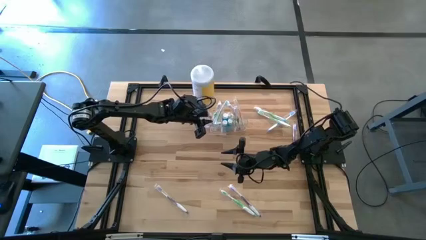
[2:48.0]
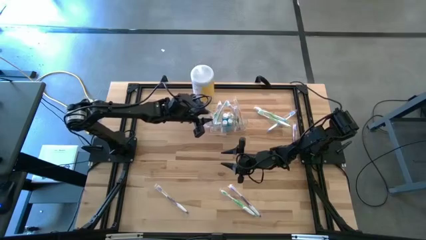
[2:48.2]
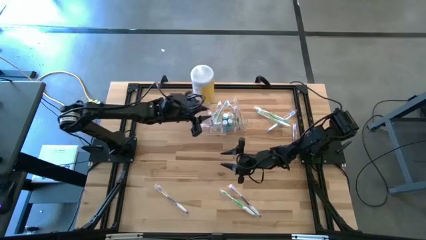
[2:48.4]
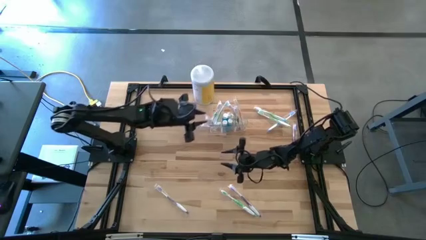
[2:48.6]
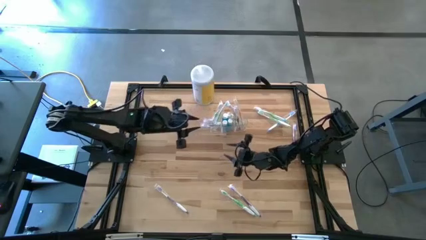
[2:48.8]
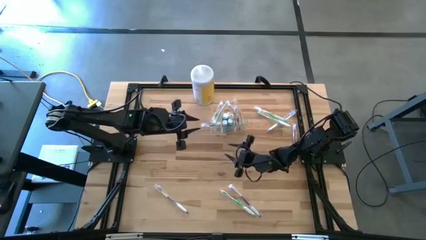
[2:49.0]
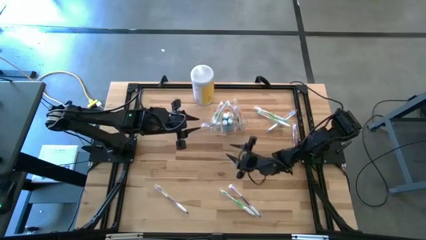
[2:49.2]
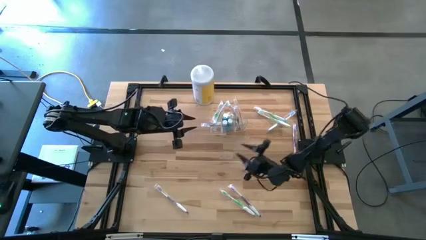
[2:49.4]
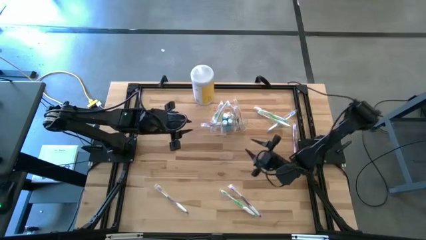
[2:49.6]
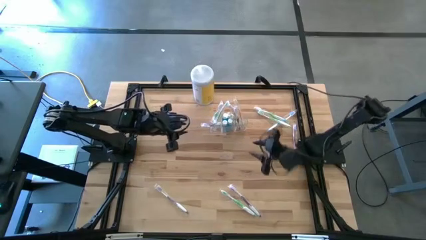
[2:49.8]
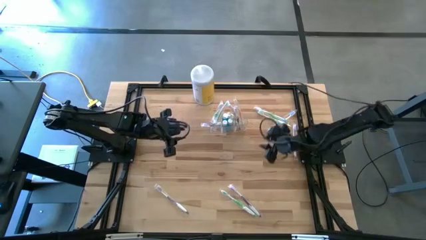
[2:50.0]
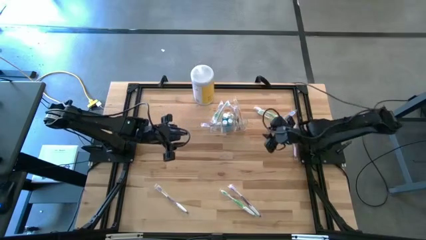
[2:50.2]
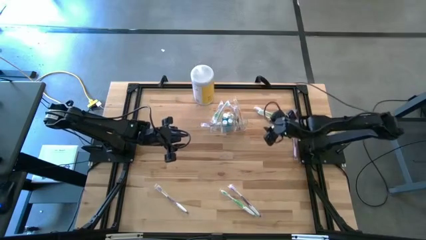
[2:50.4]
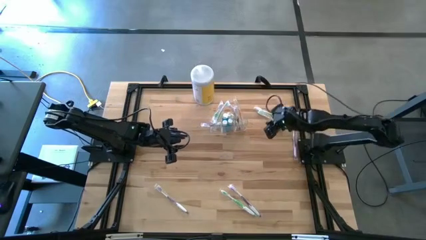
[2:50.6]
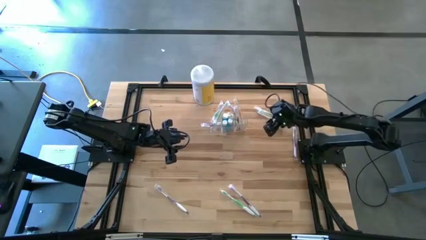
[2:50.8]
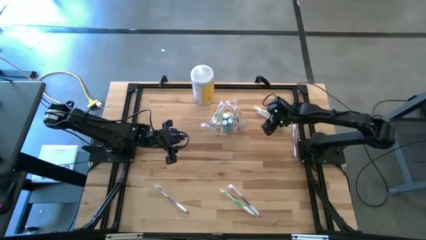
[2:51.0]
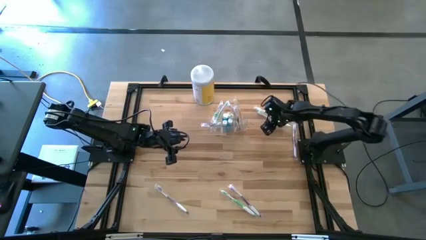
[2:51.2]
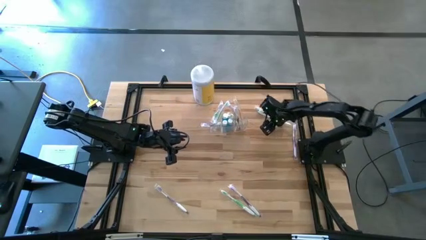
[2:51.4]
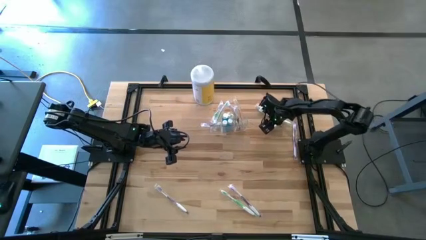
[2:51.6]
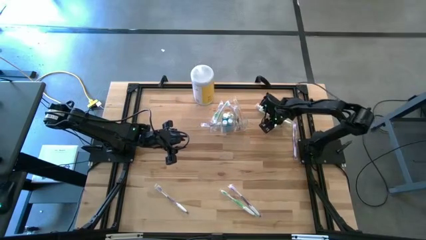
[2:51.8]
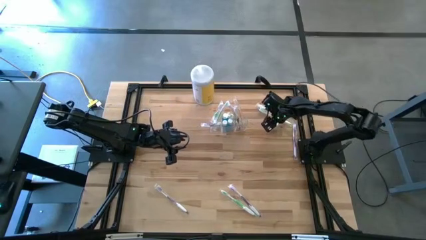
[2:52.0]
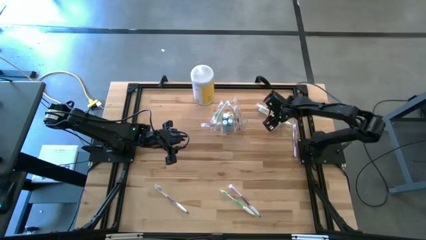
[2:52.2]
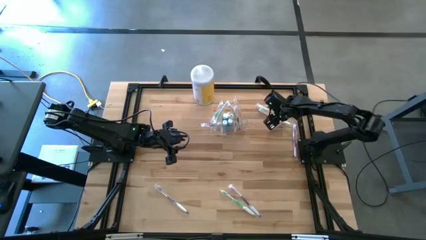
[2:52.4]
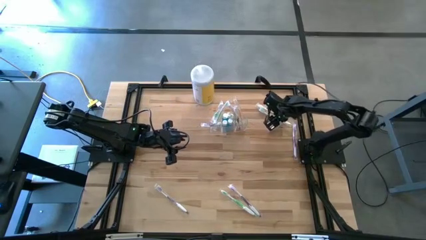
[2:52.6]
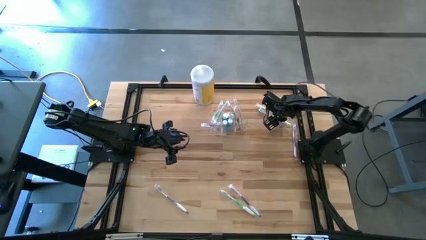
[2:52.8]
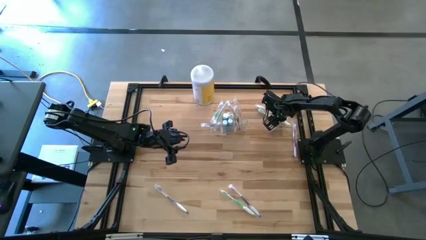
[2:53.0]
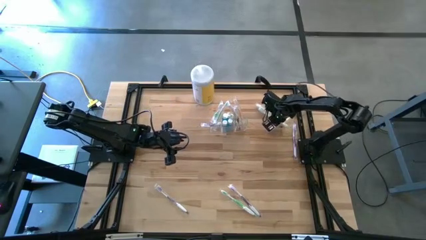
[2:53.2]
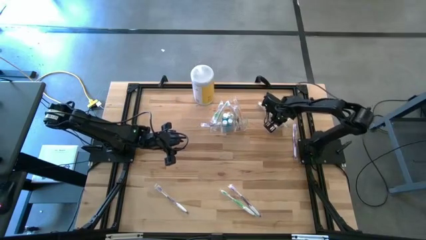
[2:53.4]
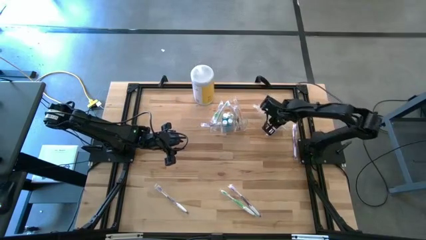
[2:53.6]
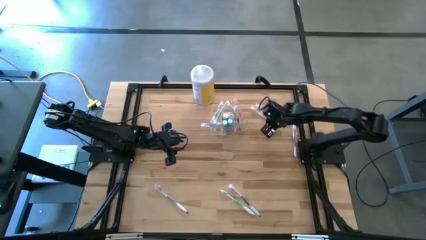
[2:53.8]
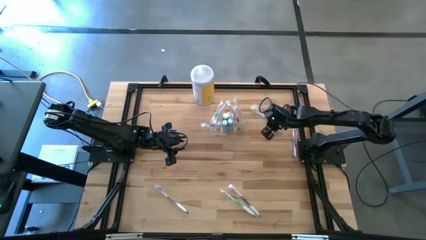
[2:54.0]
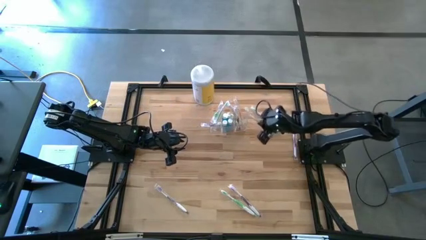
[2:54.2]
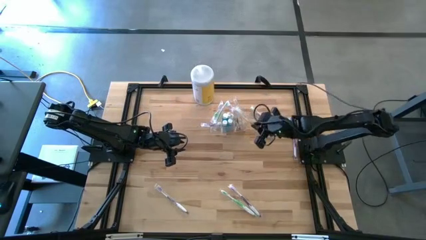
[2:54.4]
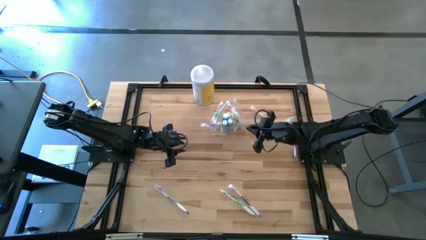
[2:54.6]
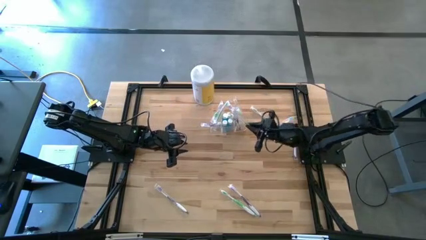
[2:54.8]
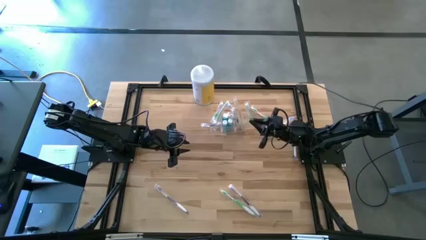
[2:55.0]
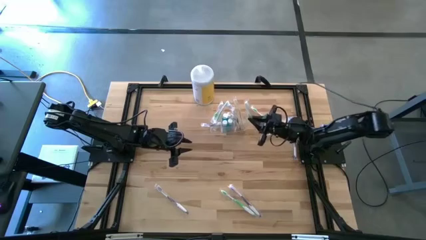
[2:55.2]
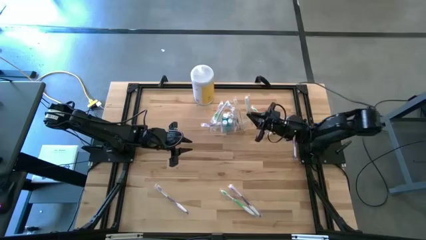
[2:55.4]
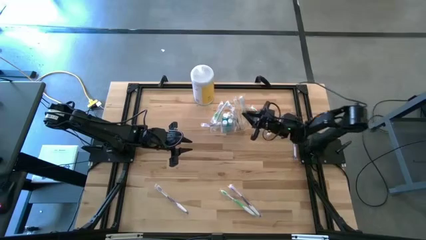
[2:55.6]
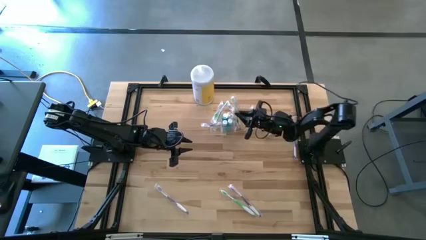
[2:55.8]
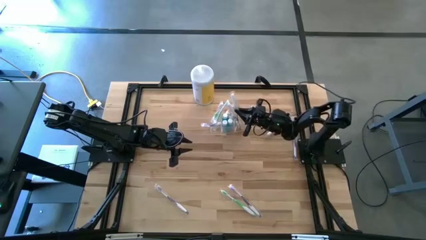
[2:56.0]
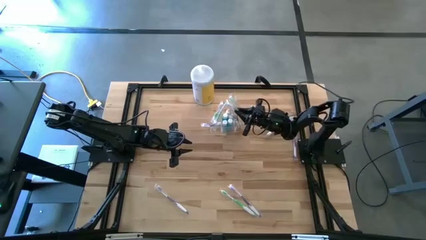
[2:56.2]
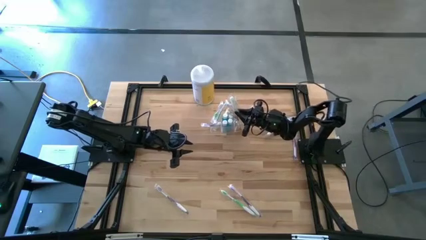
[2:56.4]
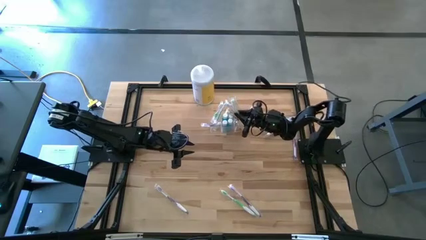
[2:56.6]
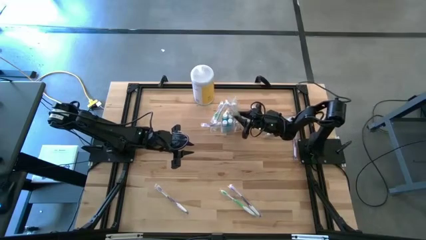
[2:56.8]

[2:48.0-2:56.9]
Task: Pick & Place toothbrushing station
Put the top green toothbrush into the transparent organizer

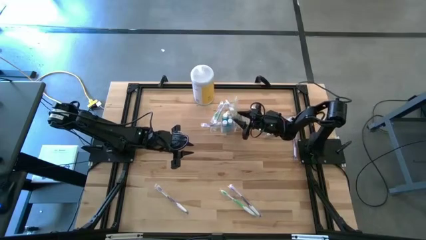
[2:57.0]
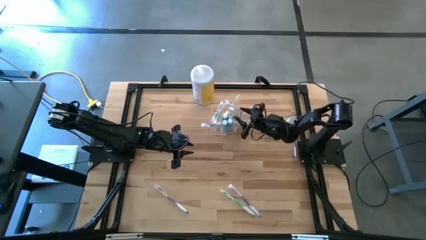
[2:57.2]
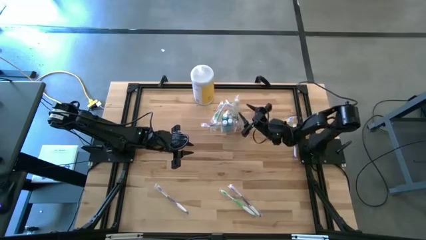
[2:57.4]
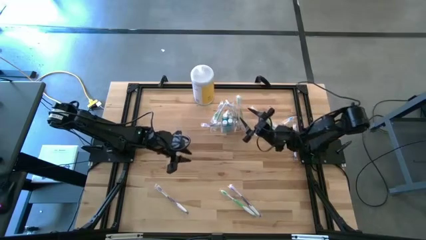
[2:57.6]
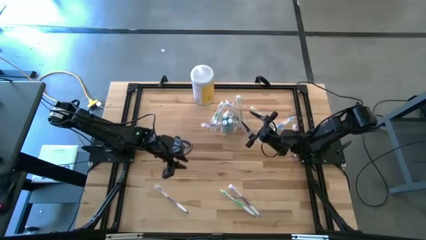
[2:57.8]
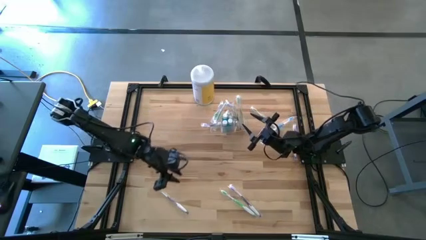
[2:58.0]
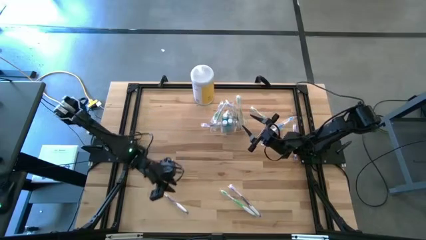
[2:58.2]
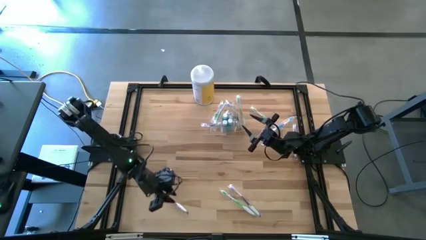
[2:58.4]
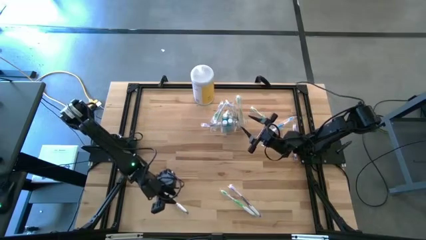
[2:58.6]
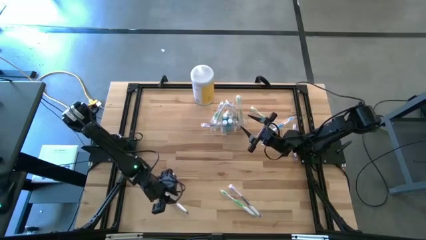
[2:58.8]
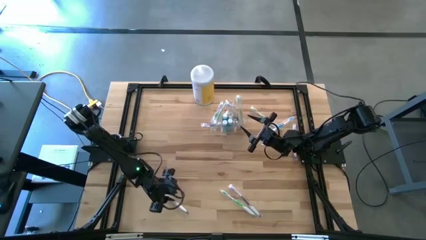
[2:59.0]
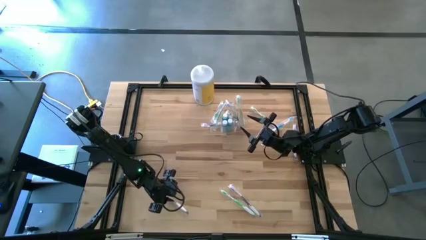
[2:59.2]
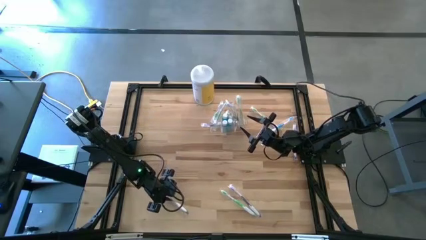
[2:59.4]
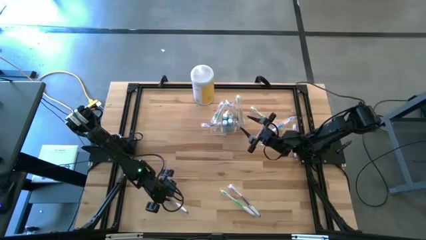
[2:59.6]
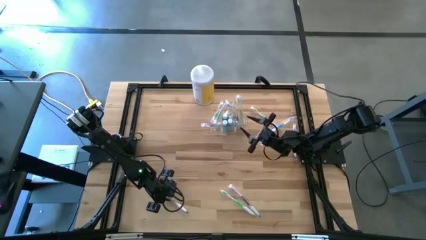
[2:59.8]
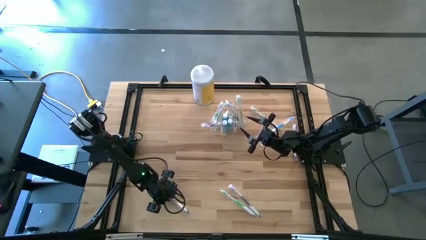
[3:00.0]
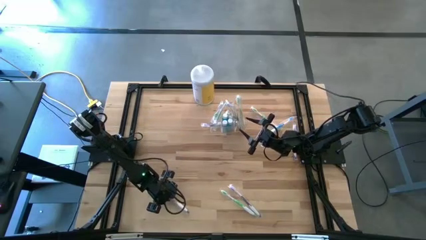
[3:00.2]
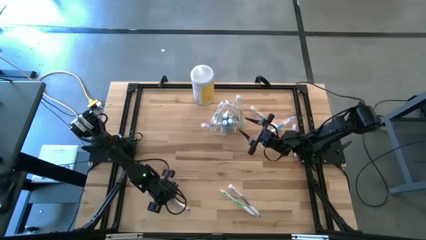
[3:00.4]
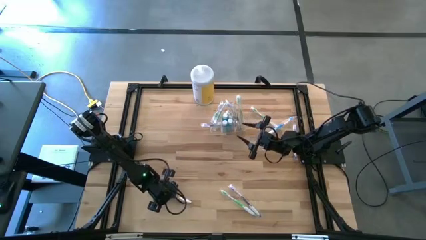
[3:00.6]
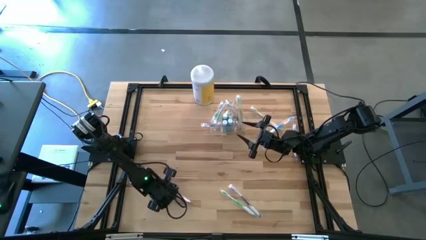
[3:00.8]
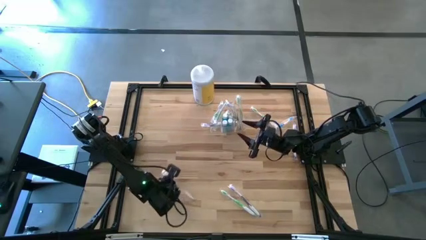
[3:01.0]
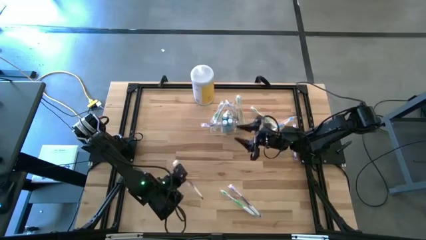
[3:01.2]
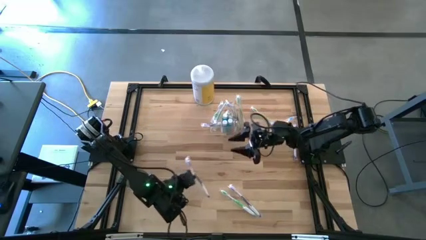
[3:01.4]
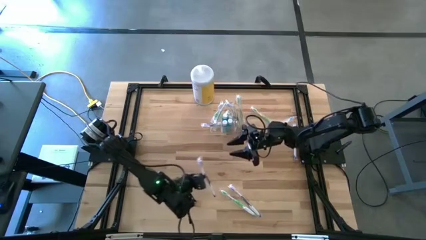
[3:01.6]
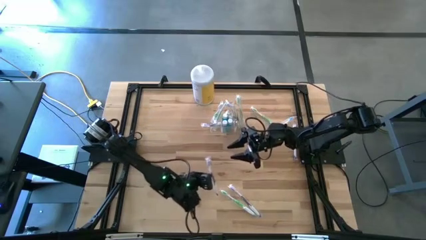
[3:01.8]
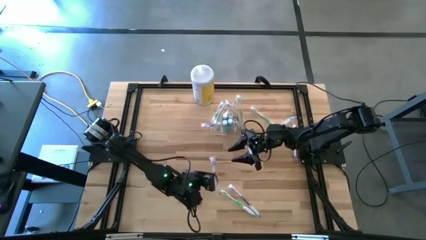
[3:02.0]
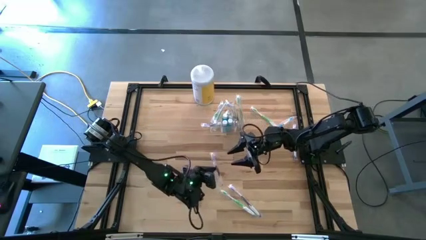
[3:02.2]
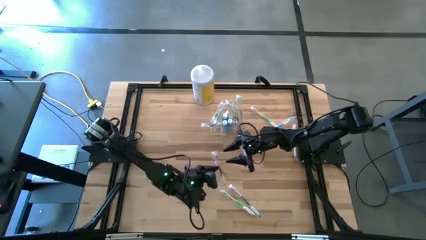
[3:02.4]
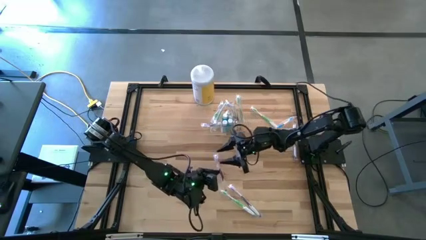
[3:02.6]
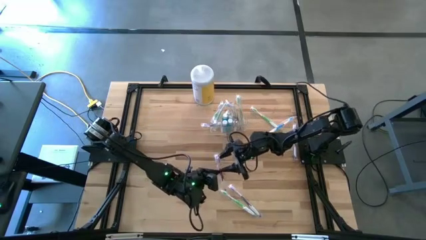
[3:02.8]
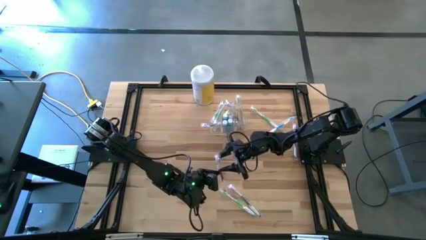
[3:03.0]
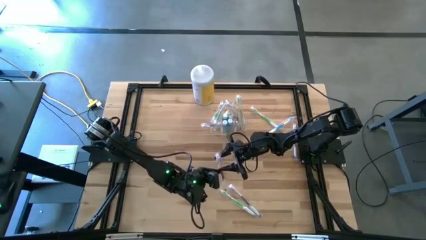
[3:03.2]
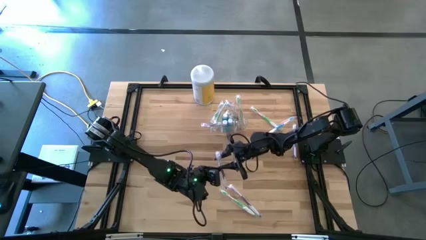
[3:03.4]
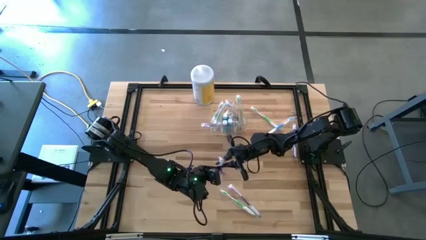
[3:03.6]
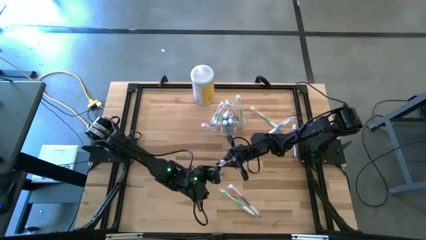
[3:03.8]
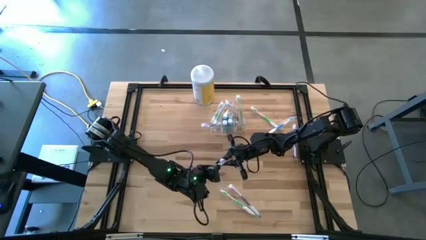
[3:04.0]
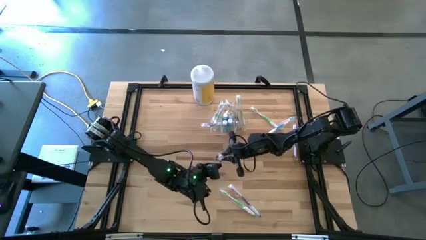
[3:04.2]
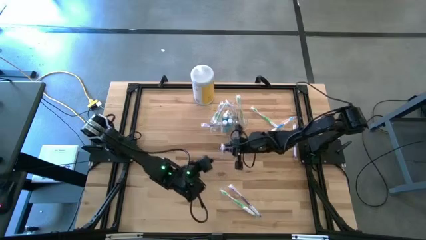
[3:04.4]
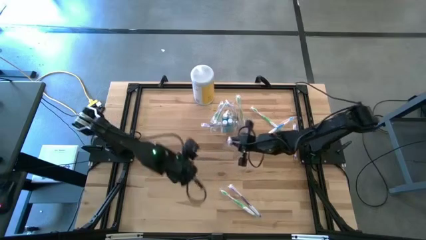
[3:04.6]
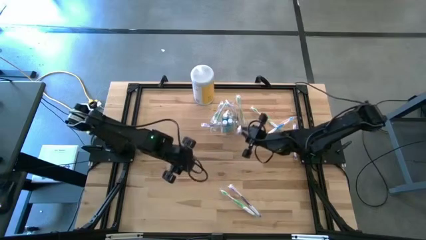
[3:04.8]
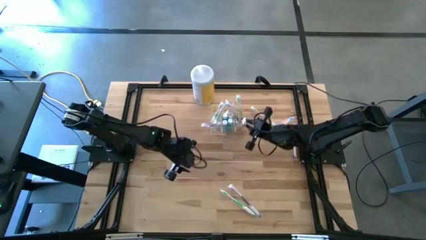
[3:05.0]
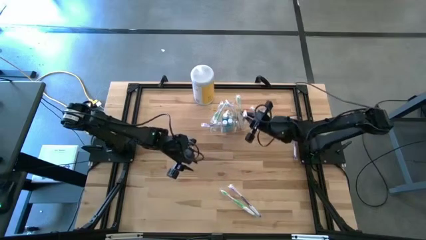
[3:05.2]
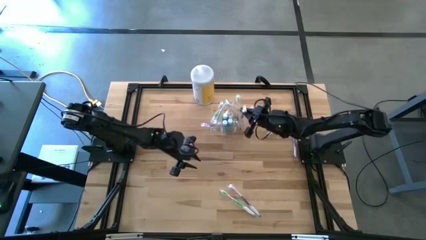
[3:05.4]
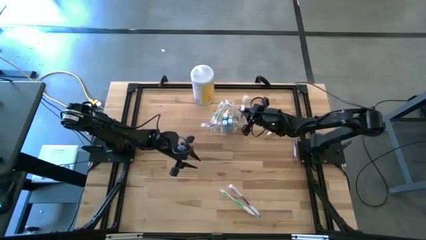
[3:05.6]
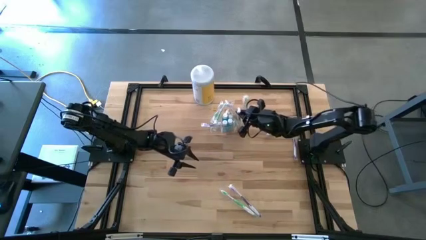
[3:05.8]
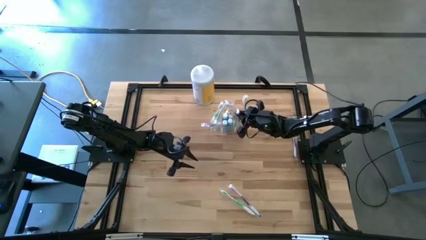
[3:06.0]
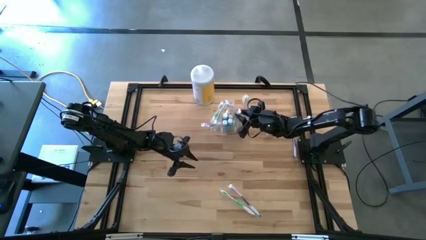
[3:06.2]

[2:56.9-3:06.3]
Put the bottom left purple toothbrush into the transparent organizer
